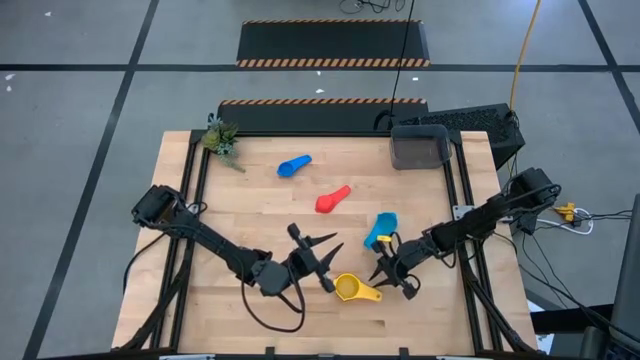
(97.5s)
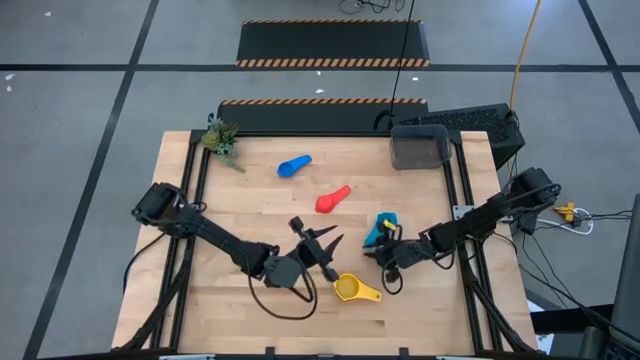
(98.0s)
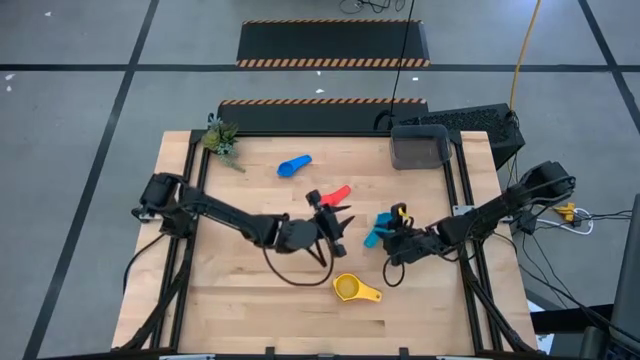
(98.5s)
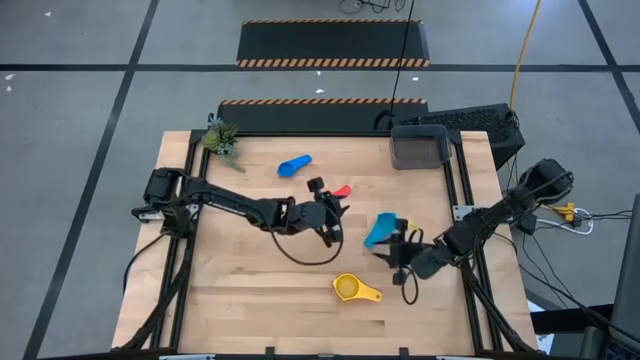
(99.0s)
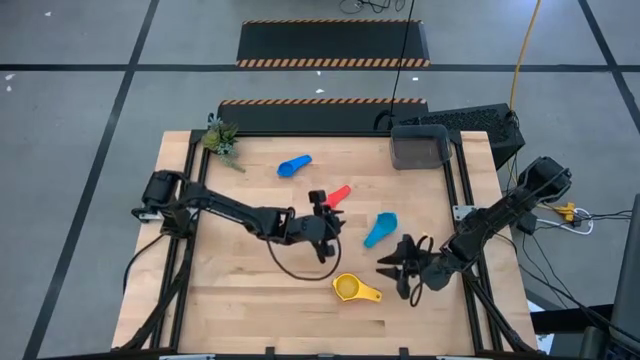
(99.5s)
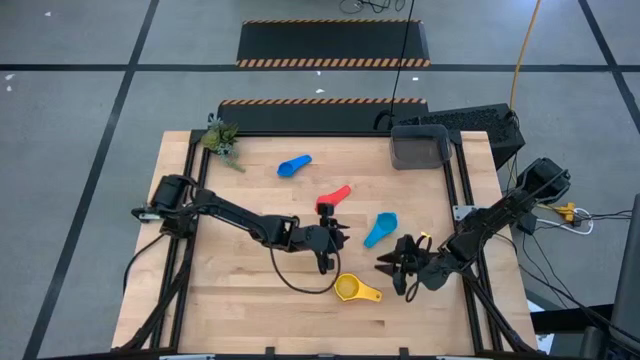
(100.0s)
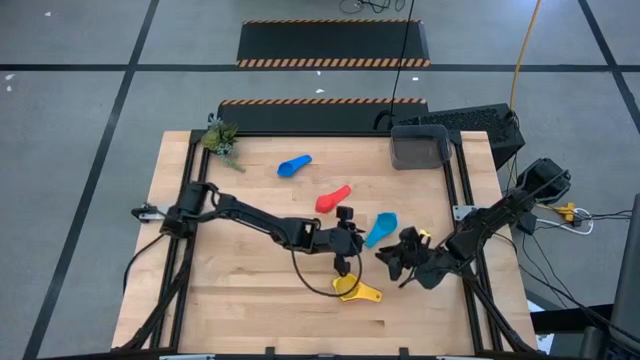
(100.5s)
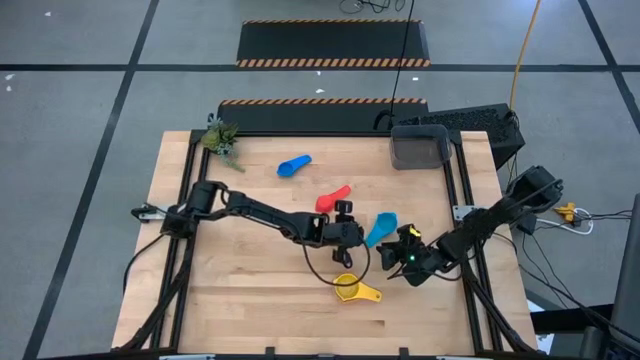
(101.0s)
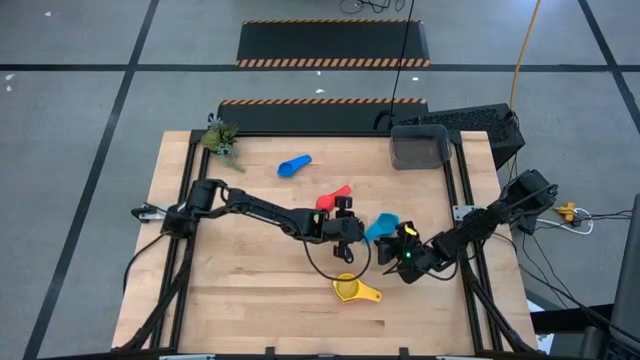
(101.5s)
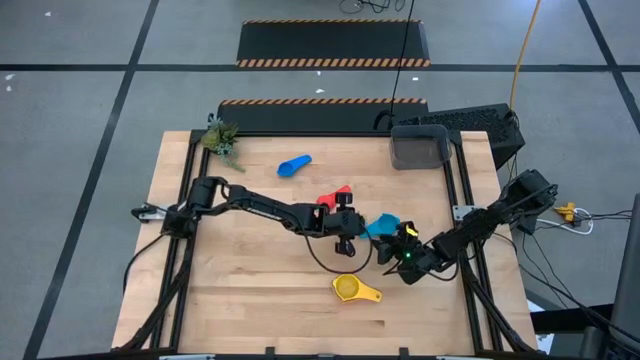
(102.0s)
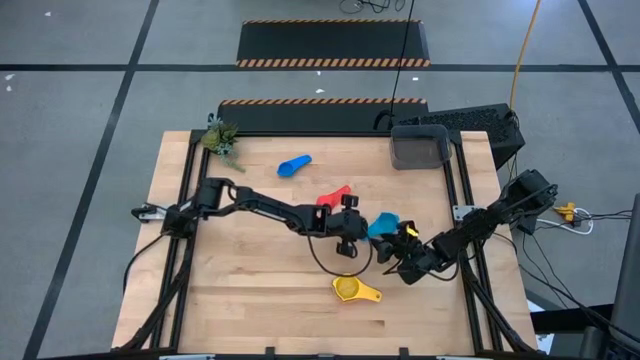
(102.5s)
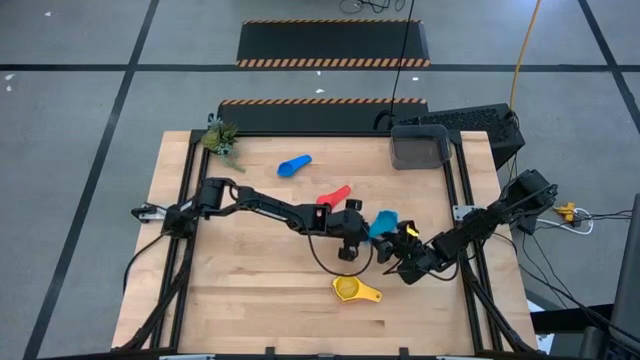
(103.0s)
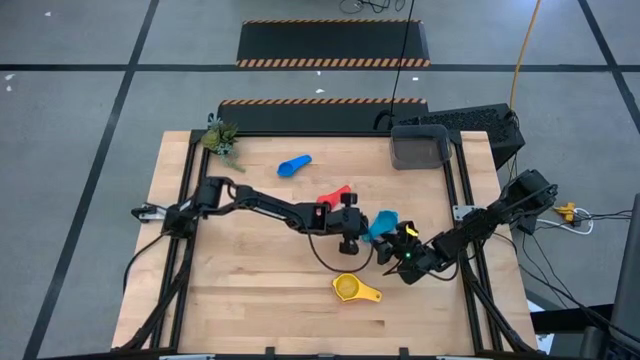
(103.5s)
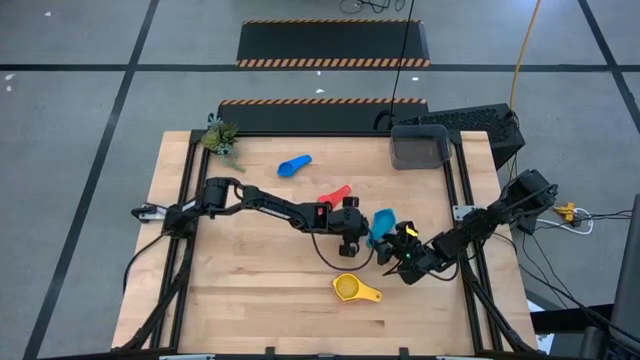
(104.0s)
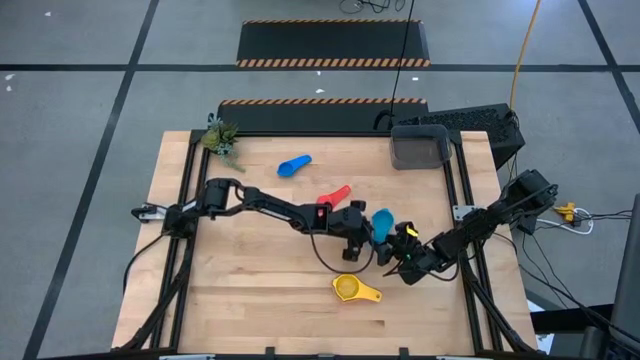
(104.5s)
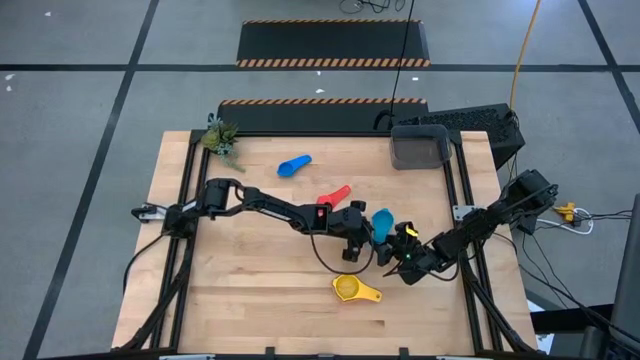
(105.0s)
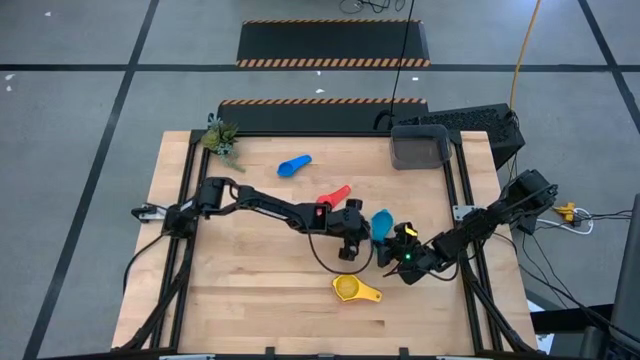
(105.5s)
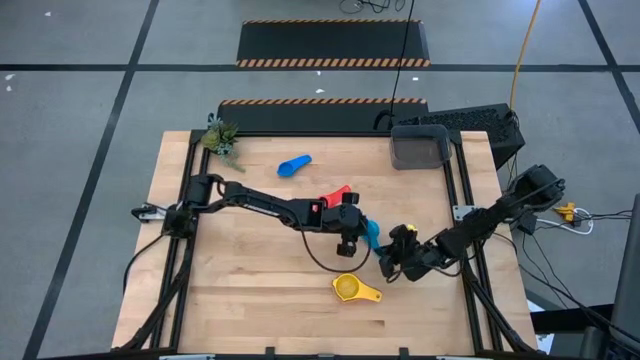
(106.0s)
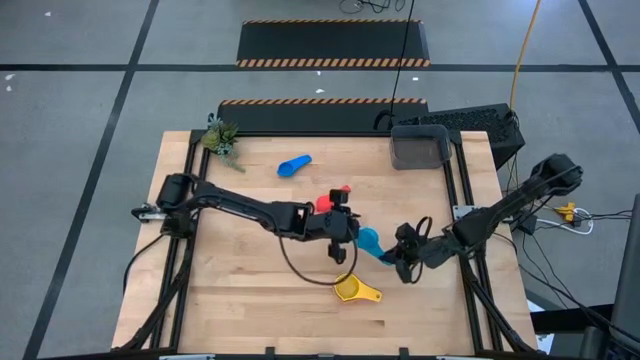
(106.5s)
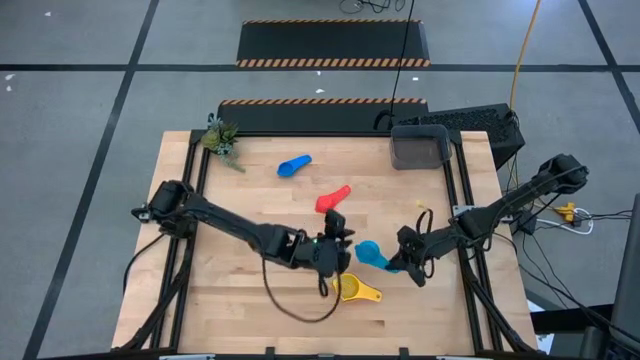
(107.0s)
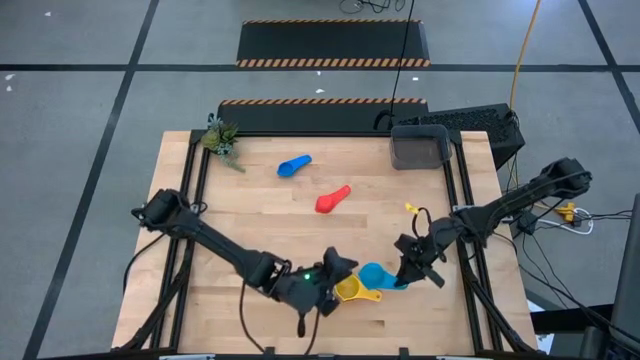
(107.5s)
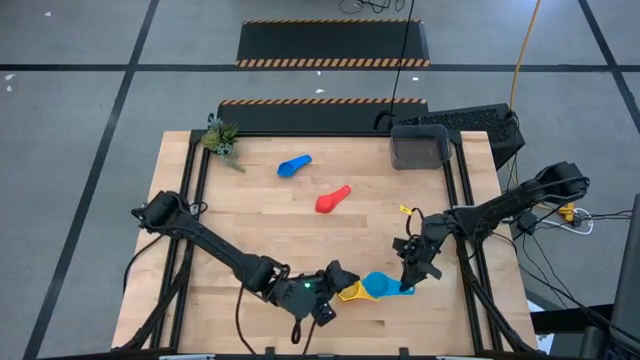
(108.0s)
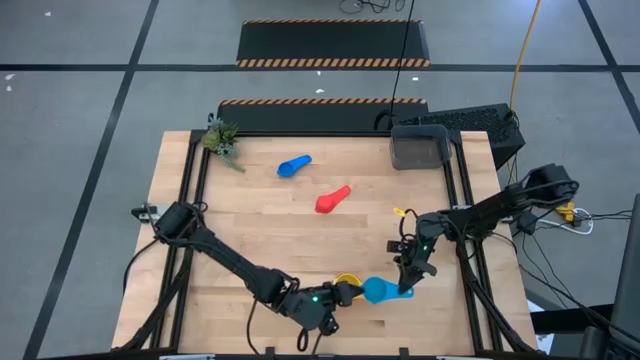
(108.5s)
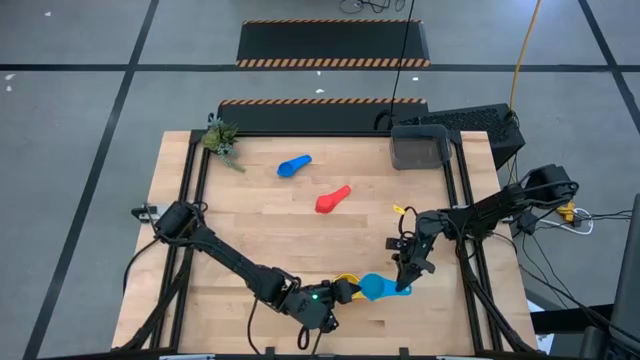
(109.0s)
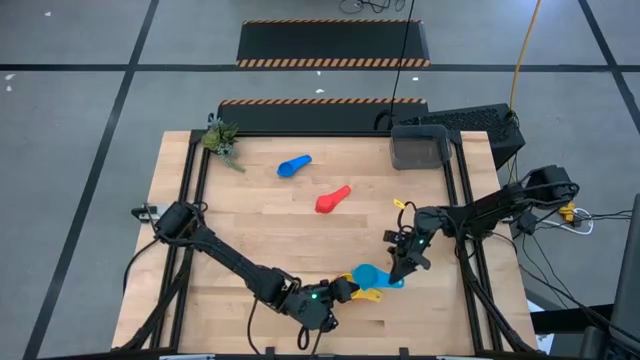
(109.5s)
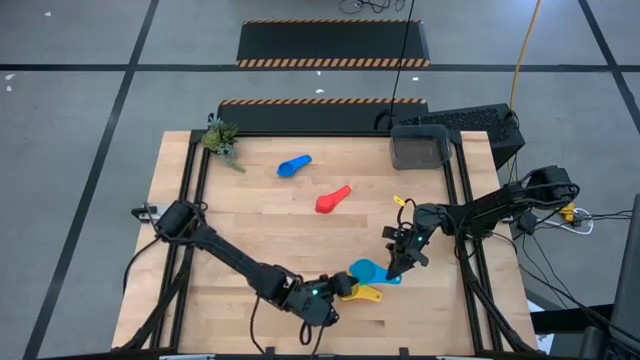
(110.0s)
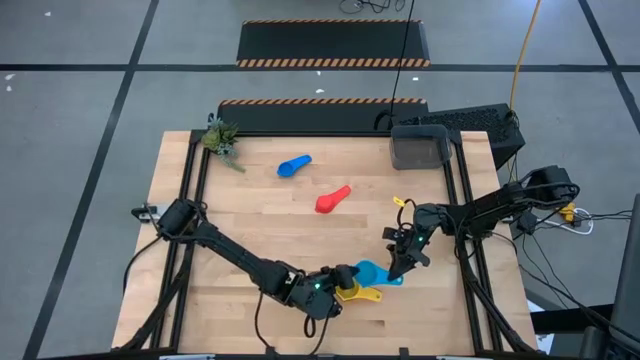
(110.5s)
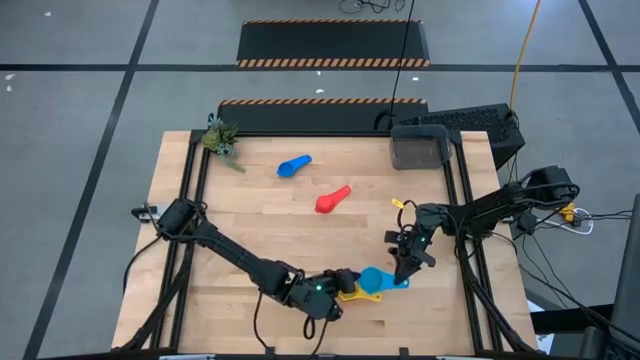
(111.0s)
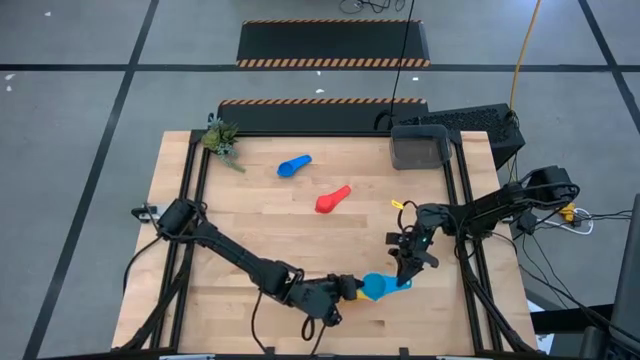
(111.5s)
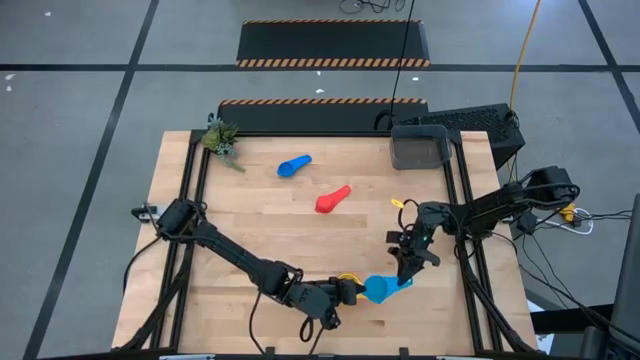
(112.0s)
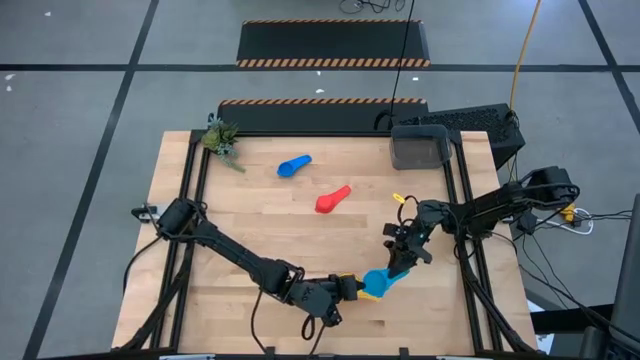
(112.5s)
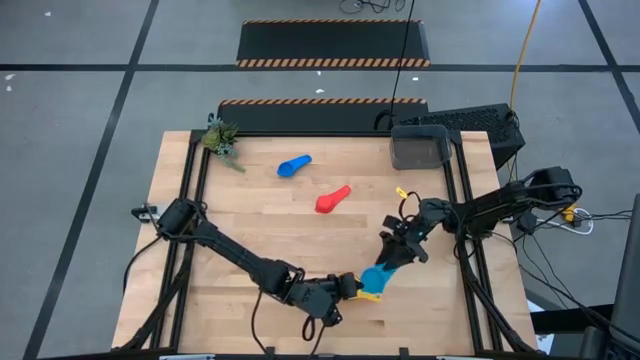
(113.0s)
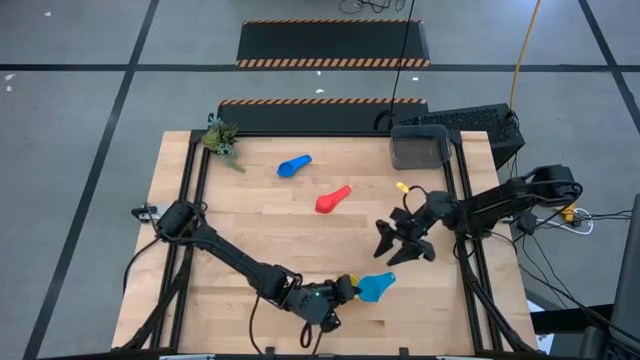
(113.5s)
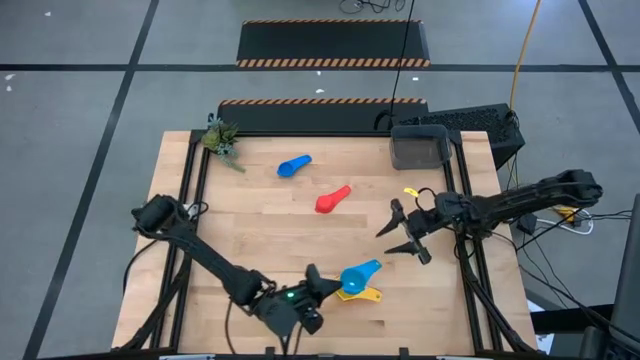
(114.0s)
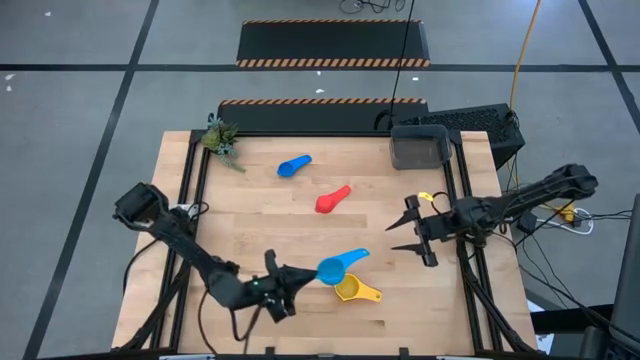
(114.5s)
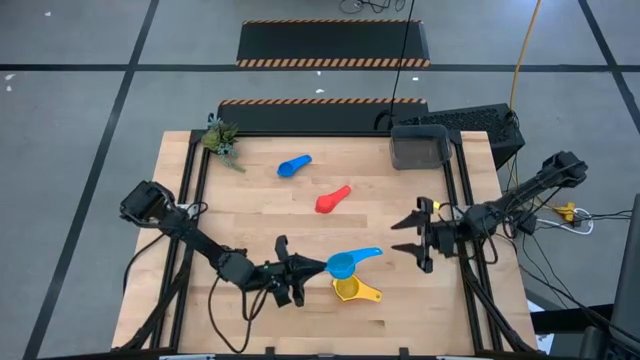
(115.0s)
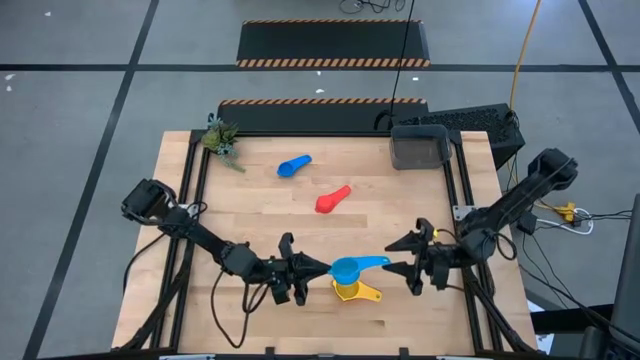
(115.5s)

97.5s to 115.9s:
Task: Nest measuring cups in basket
Stack the light blue measuring cup on top of the yellow measuring cup

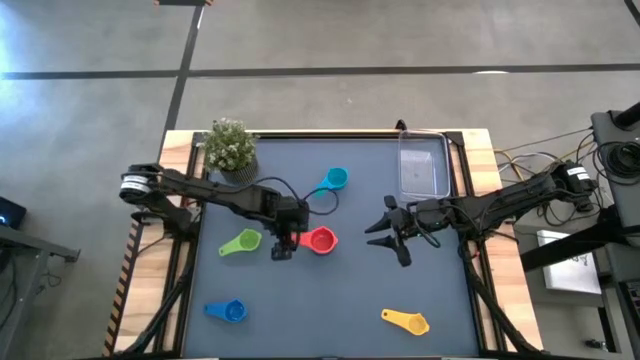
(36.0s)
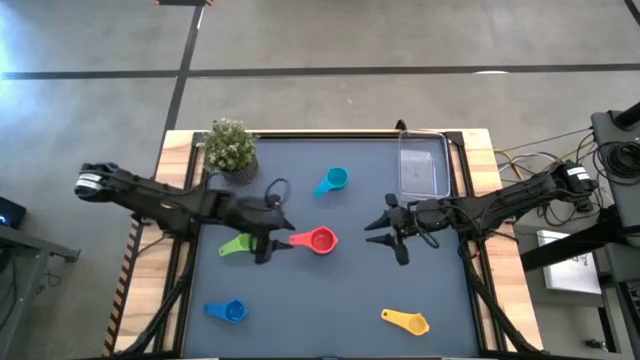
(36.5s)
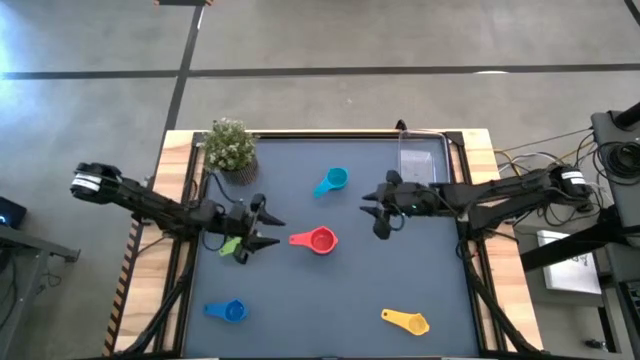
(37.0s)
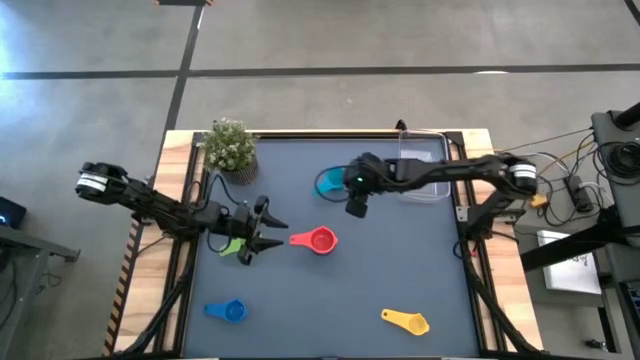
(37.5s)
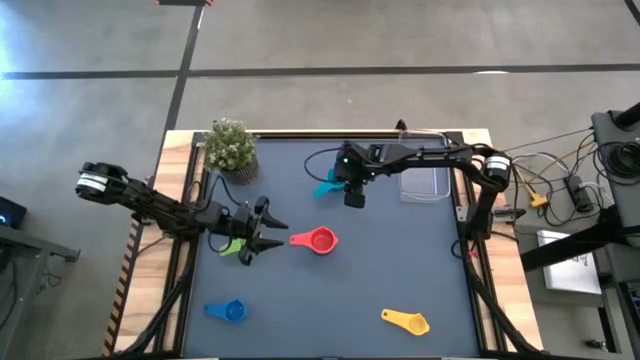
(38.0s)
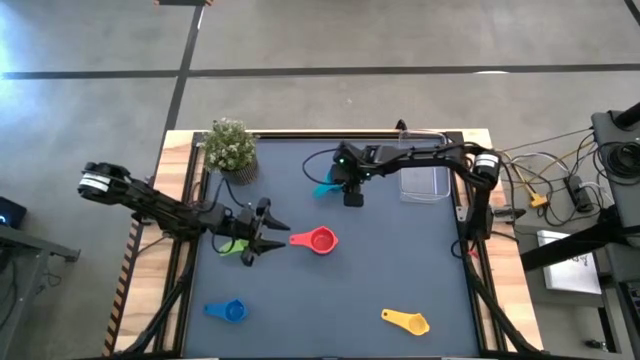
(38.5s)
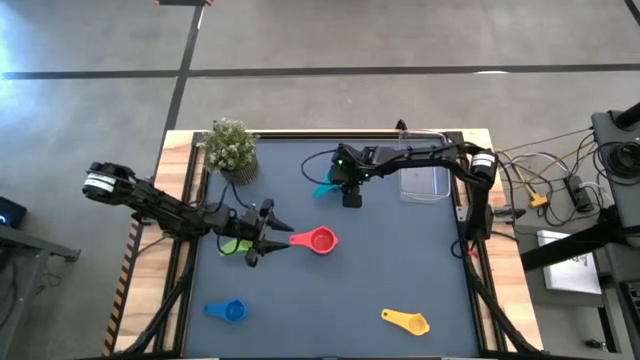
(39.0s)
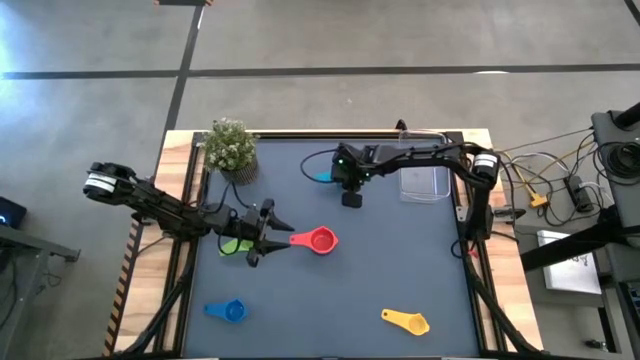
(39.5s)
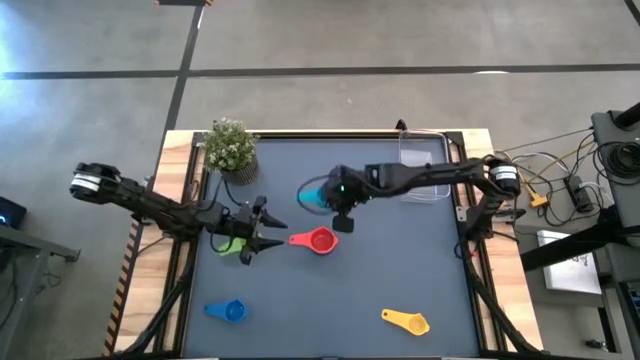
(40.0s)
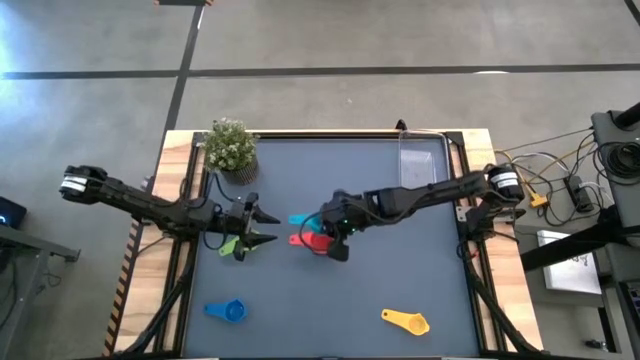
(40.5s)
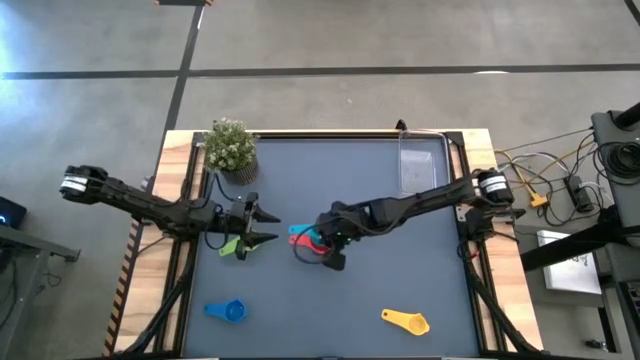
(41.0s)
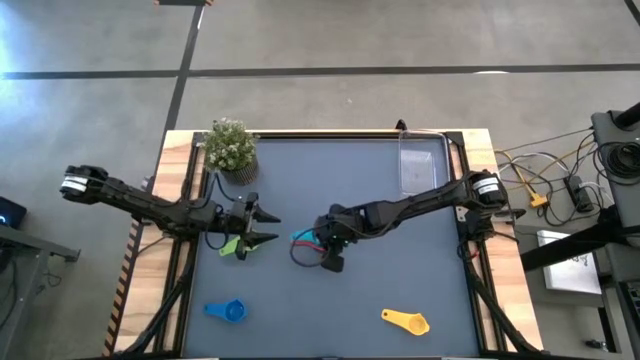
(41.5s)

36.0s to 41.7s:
Task: Nest measuring cups in basket
Stack the light blue measuring cup on top of the red measuring cup
